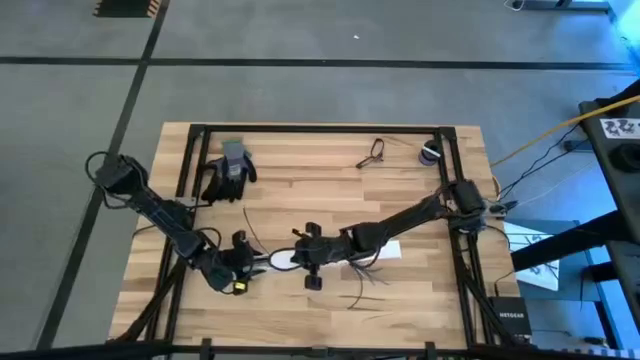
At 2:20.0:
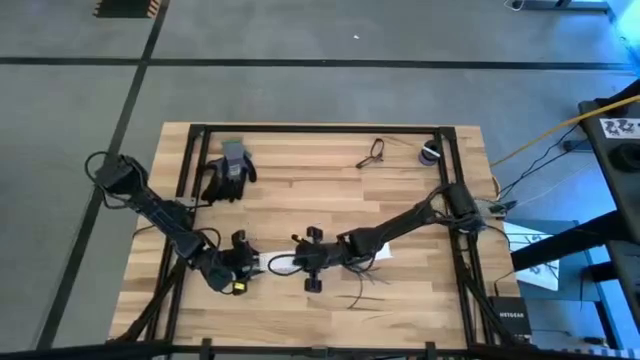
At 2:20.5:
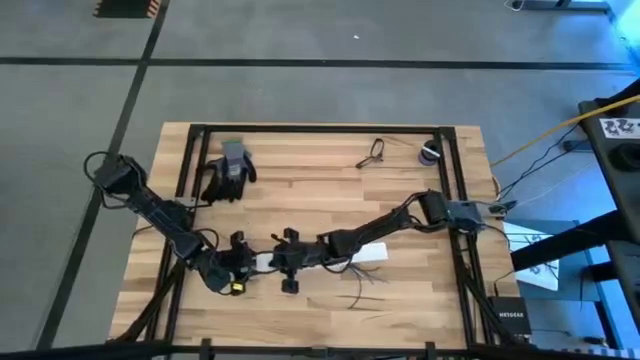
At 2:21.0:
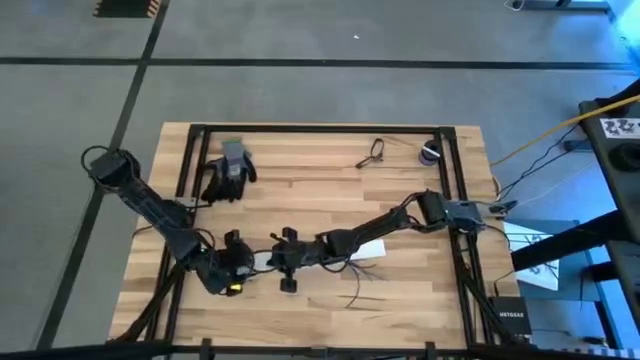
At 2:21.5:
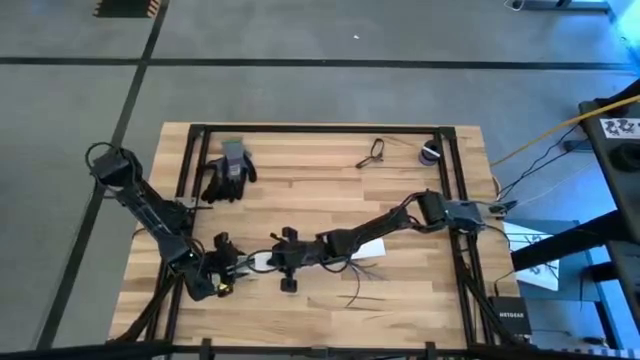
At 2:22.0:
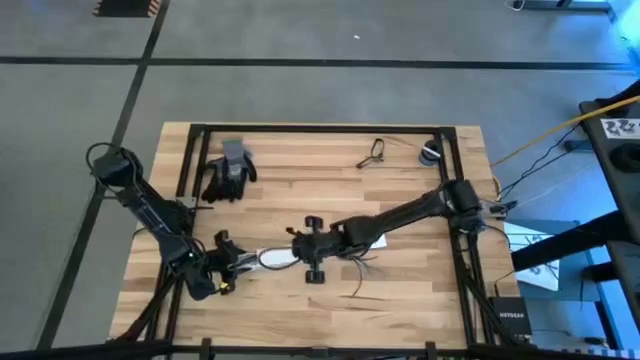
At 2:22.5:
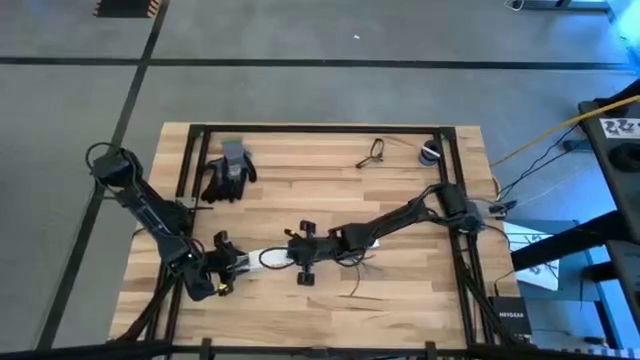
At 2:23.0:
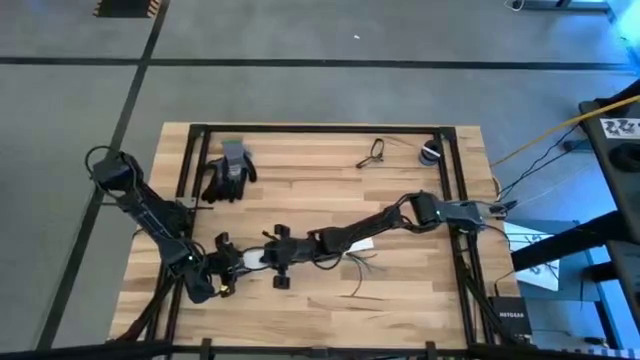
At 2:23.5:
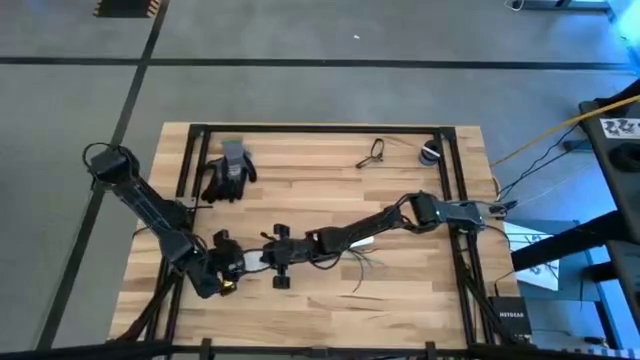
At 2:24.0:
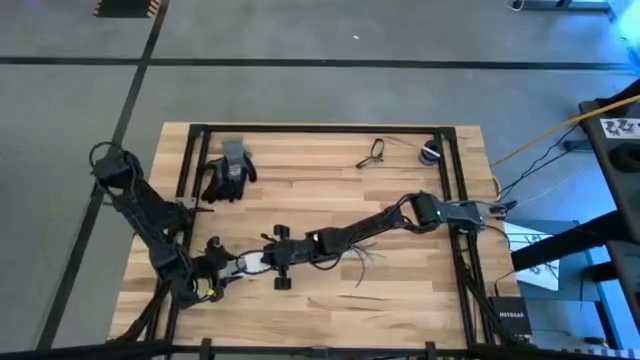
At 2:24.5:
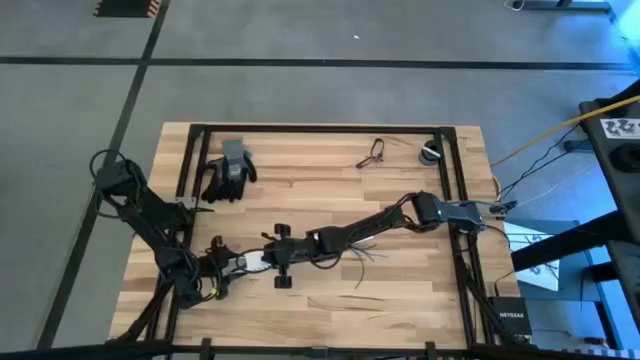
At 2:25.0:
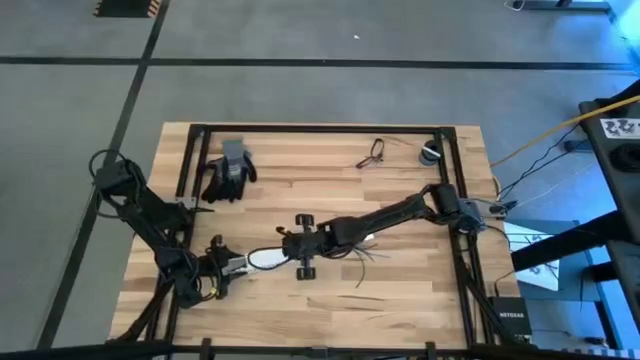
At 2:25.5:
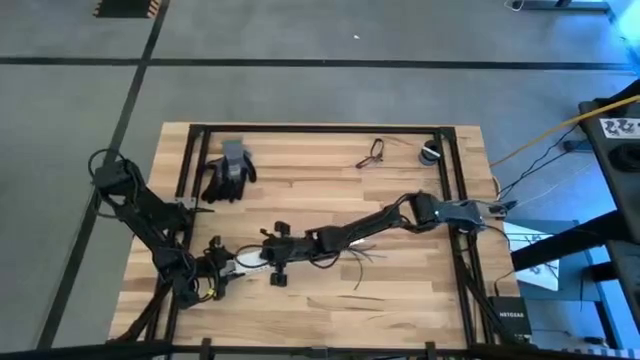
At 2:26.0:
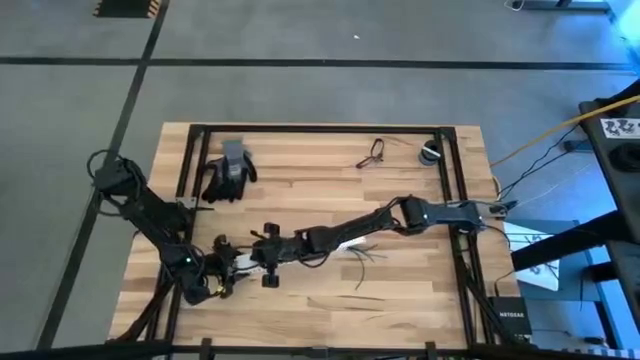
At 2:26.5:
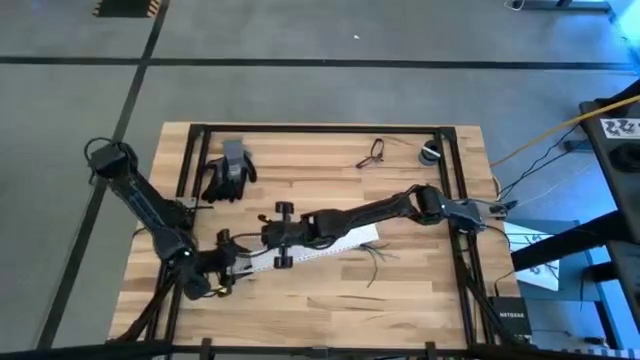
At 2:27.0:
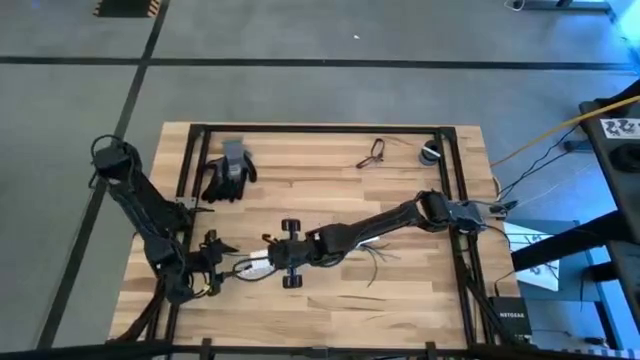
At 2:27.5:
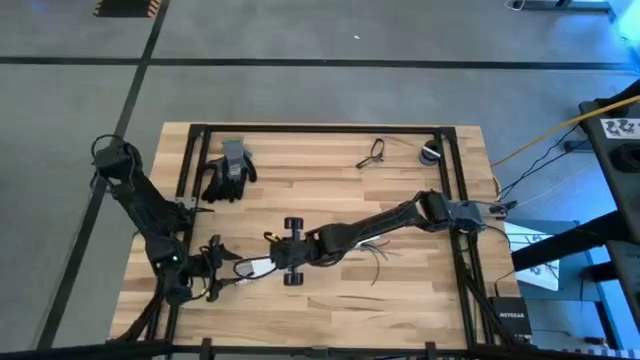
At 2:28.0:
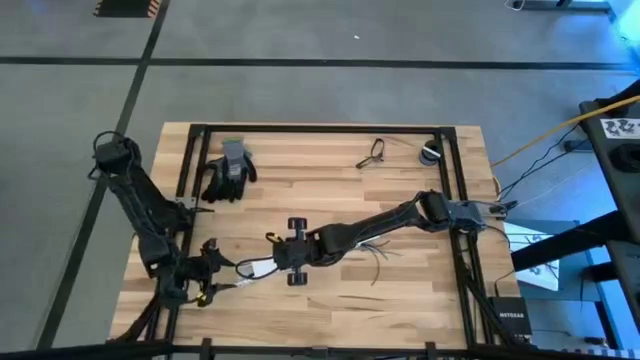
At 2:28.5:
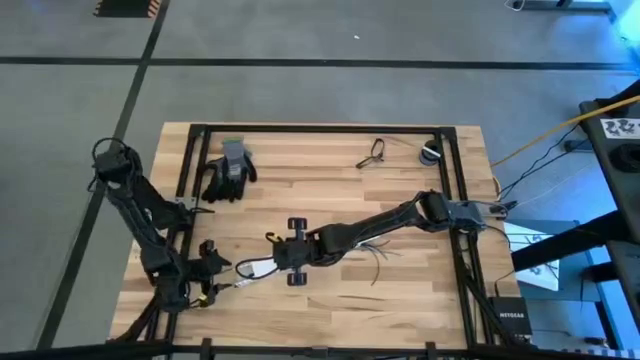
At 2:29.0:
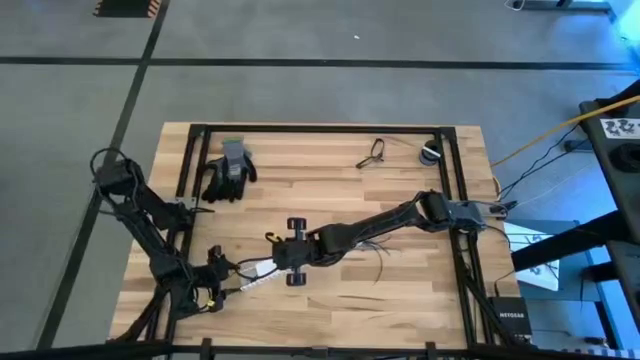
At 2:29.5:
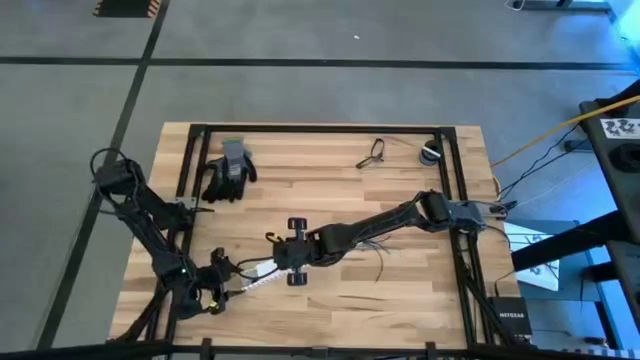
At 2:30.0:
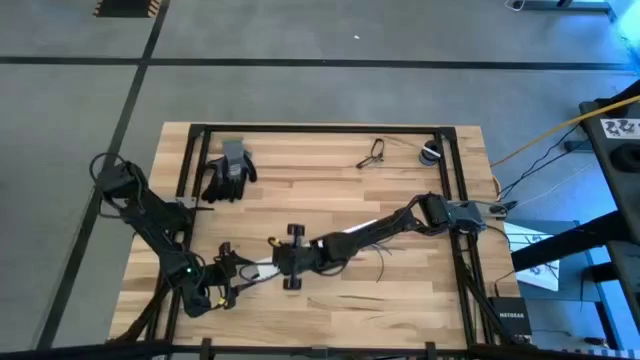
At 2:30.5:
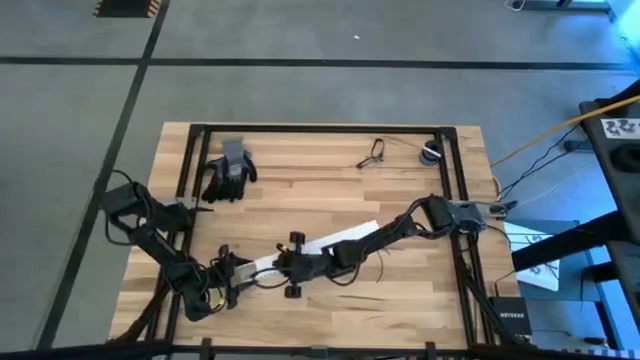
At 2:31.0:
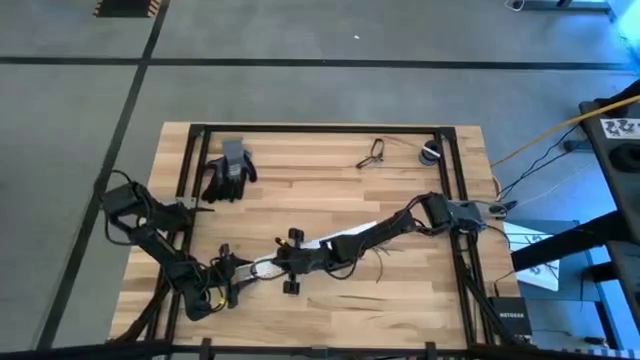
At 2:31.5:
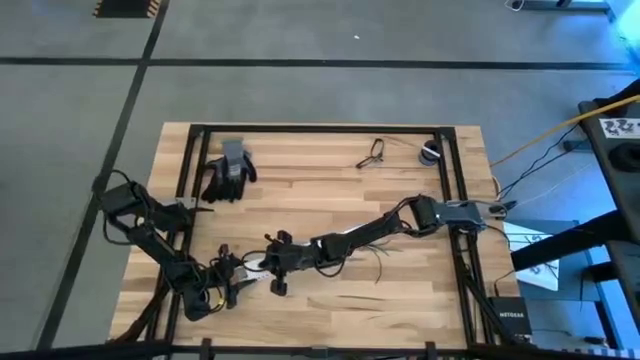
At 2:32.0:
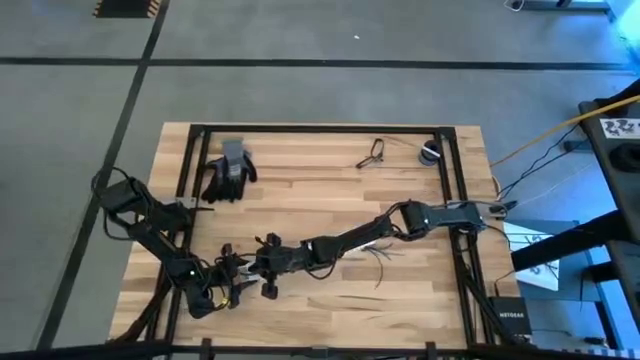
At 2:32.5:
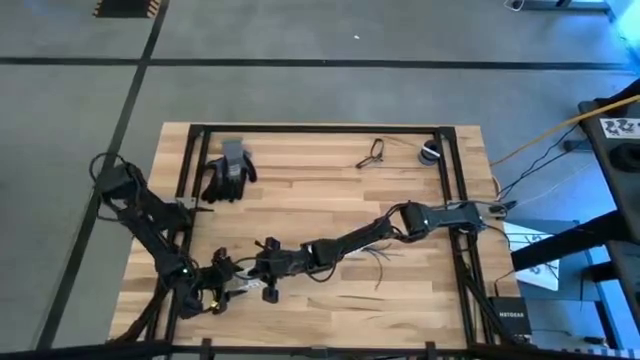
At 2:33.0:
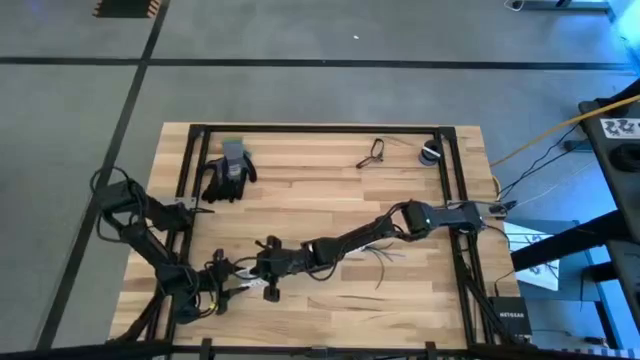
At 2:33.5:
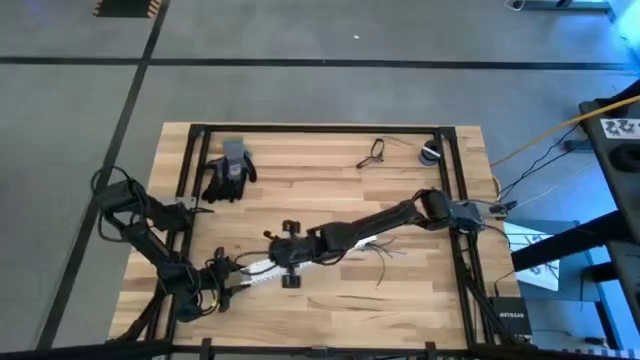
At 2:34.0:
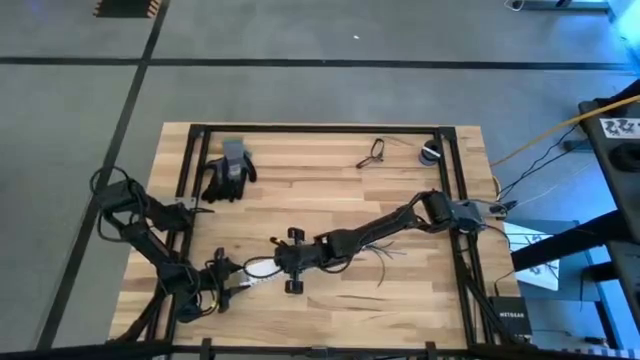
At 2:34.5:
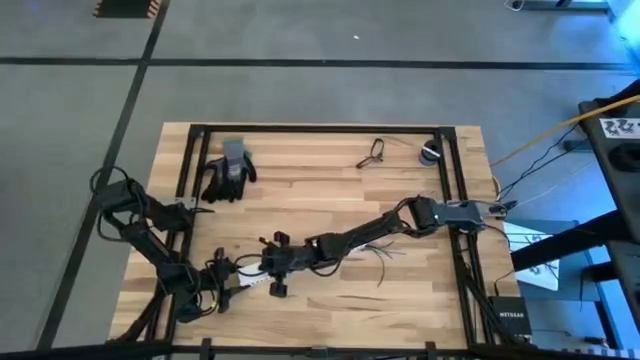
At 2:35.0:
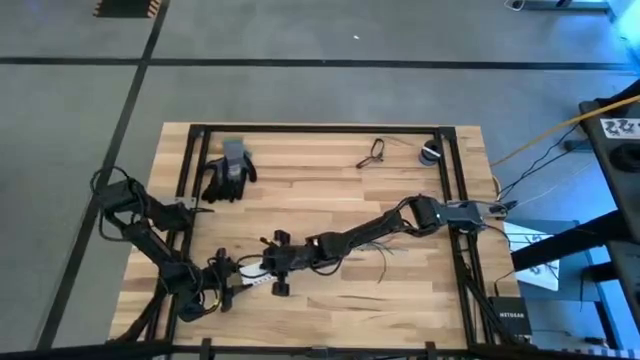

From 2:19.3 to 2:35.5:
Task: Ziptie cables
Close the cable duct

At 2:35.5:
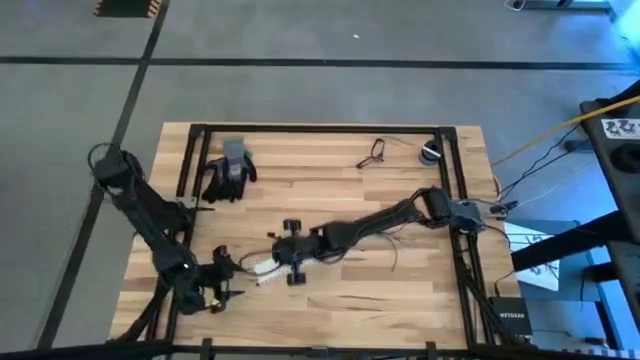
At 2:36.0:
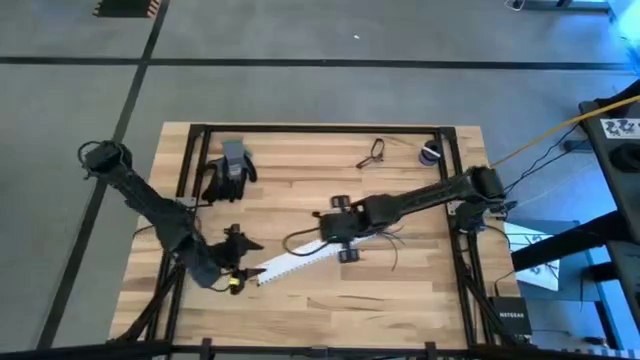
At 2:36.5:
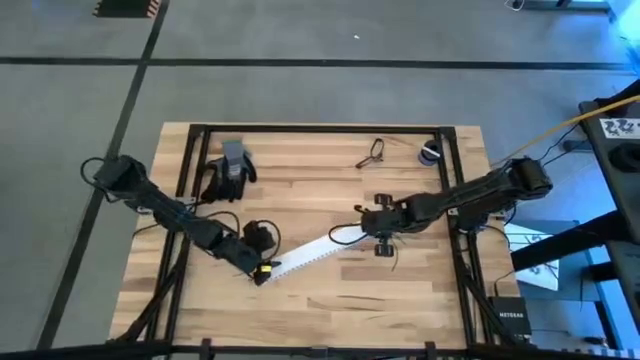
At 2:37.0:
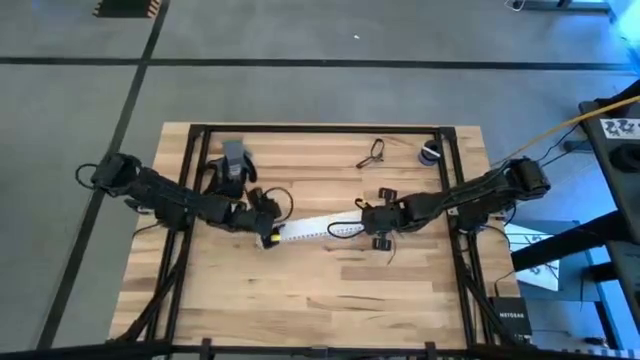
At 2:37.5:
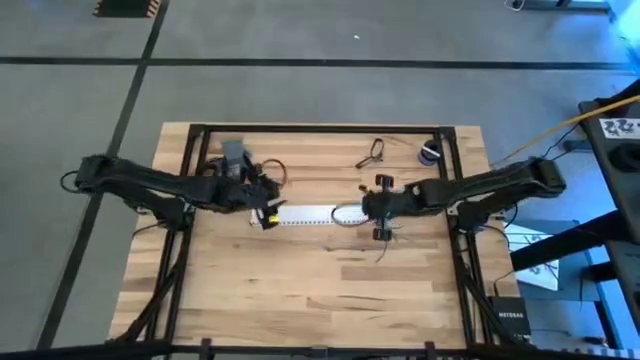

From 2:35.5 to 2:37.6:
Move the white cable duct from the lower middle to the center

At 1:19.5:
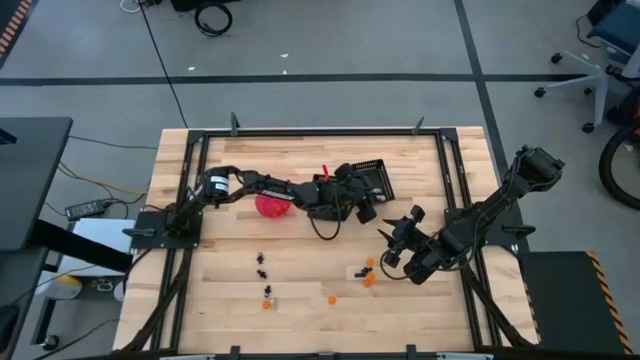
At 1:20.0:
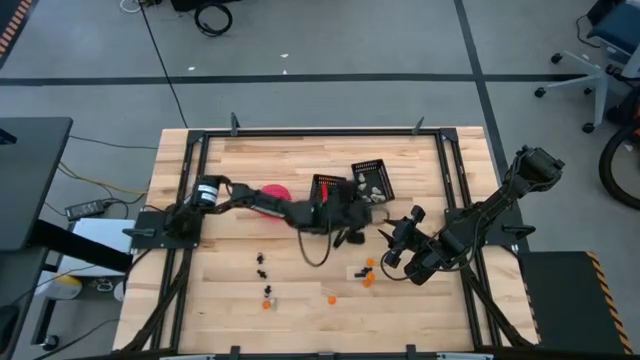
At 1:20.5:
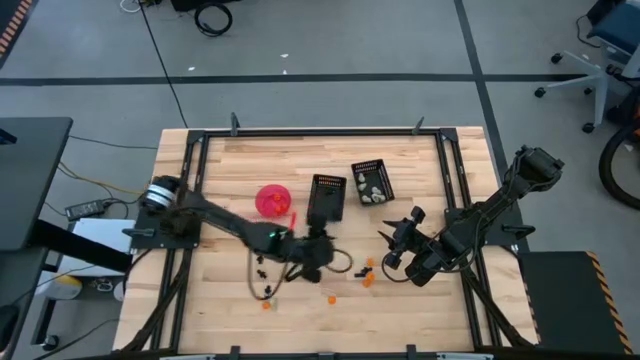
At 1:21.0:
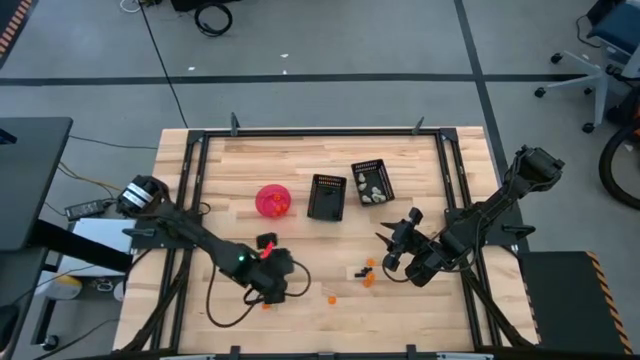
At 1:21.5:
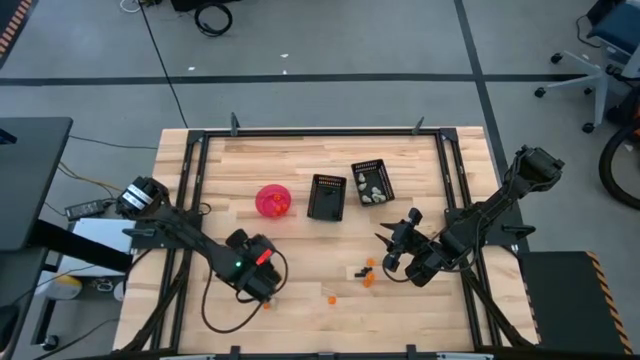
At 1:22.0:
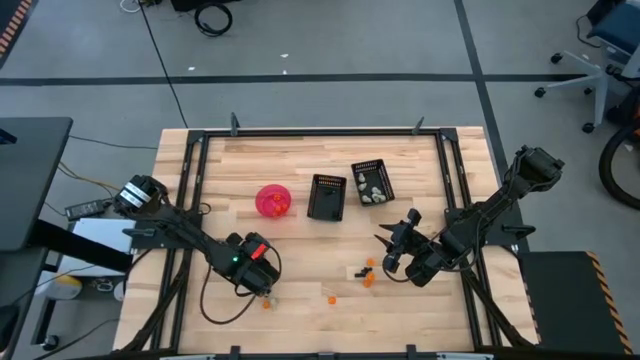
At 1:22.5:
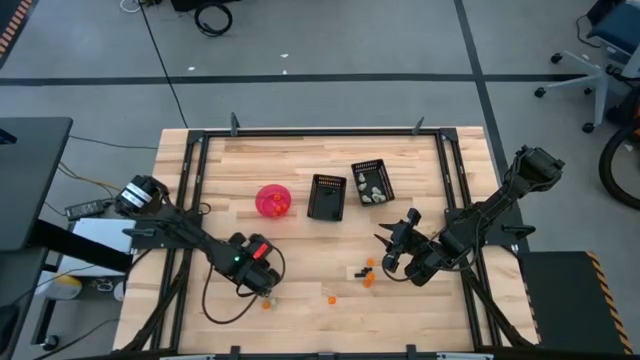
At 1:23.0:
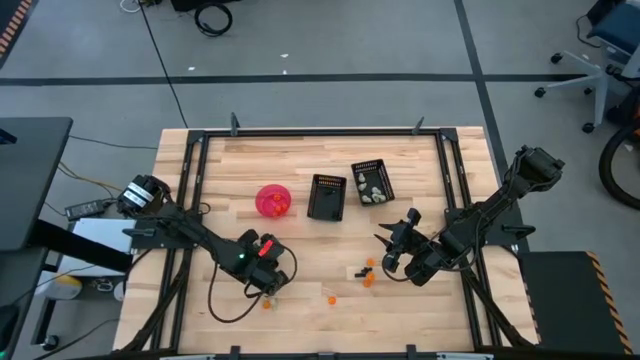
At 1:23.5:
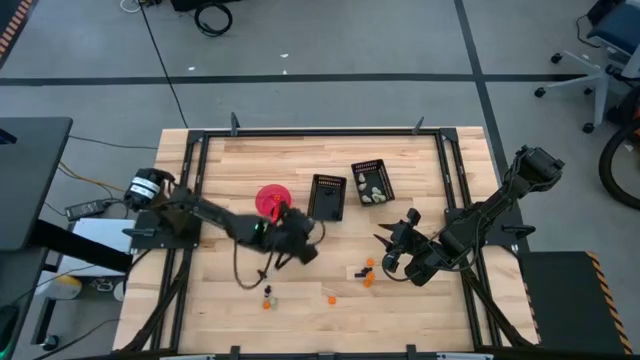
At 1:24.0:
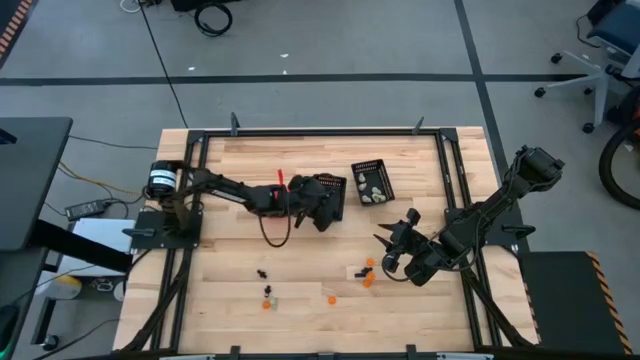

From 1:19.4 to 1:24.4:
Task: Sort Halloween decoration
Put the black skeleton toy into the left black bin
